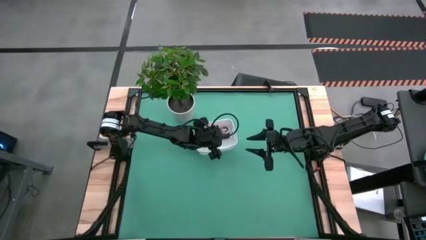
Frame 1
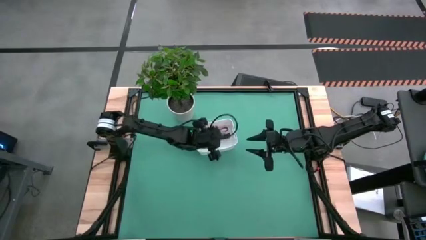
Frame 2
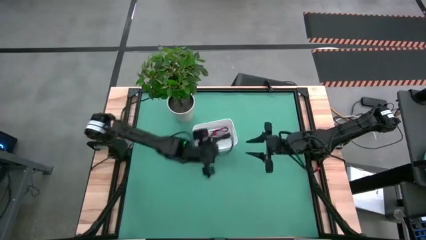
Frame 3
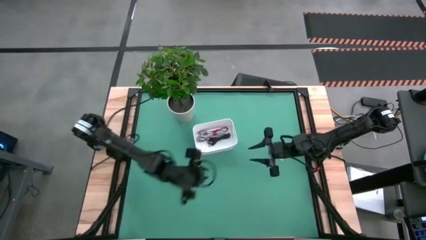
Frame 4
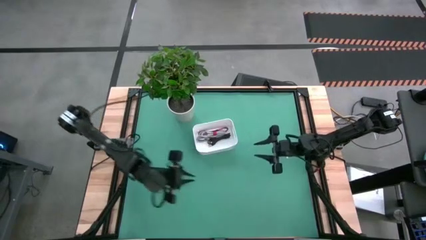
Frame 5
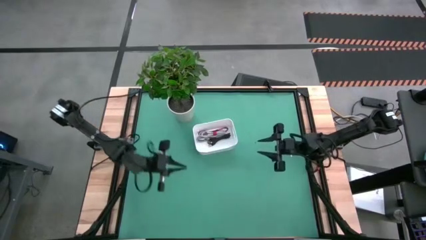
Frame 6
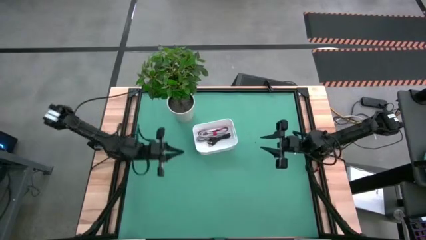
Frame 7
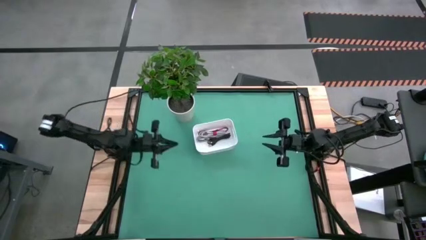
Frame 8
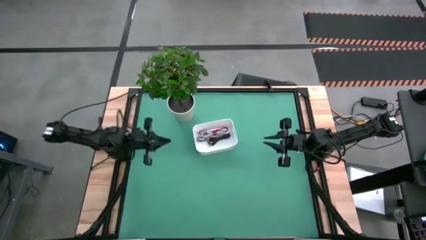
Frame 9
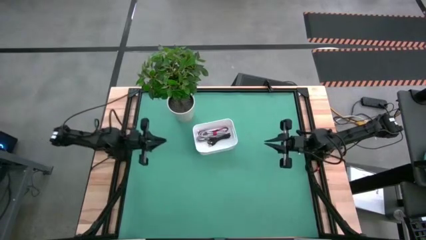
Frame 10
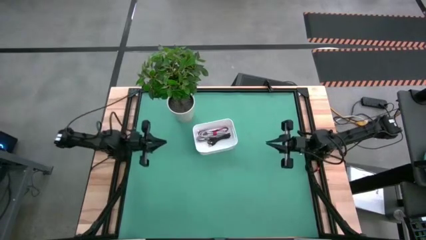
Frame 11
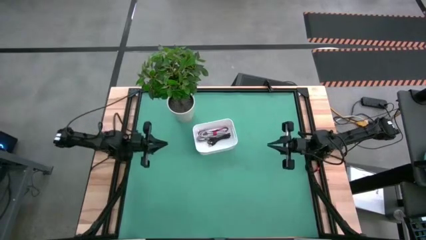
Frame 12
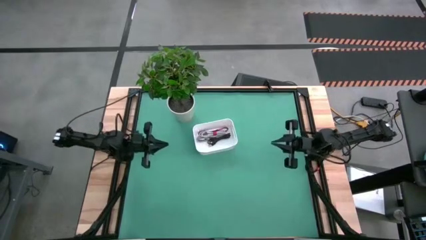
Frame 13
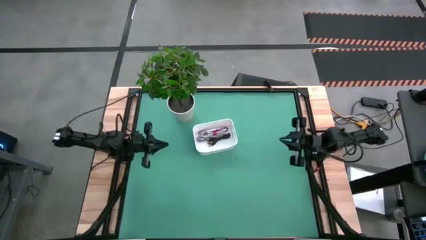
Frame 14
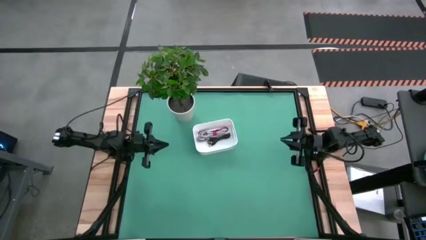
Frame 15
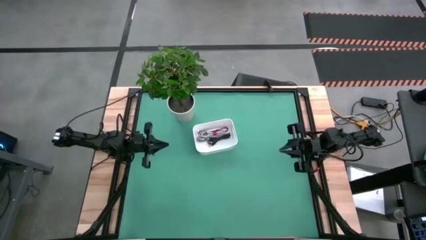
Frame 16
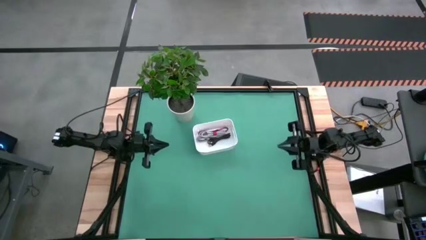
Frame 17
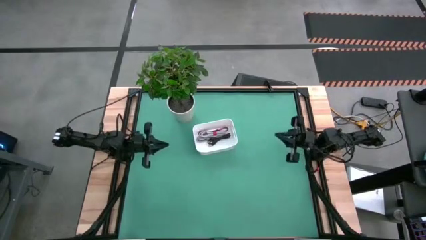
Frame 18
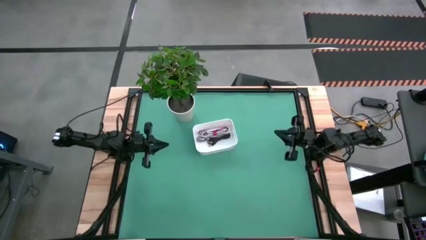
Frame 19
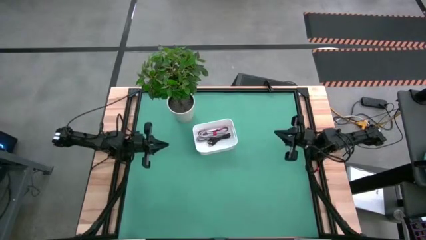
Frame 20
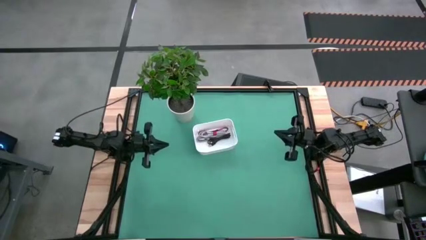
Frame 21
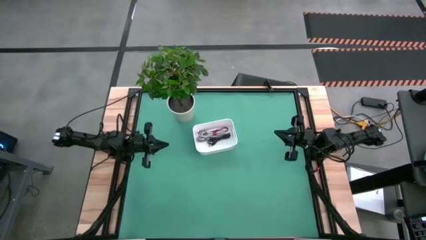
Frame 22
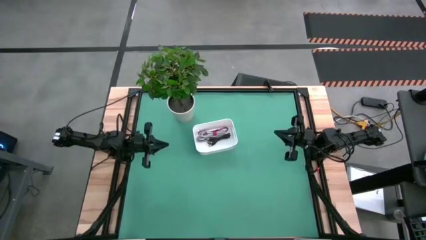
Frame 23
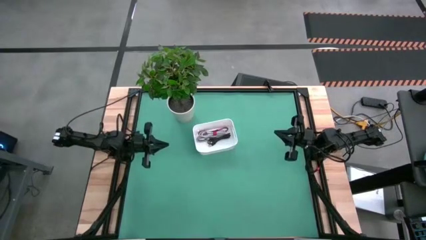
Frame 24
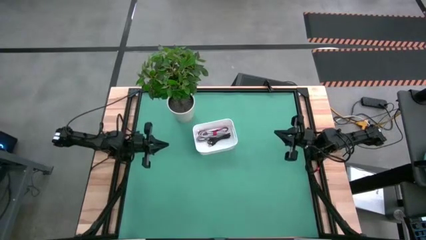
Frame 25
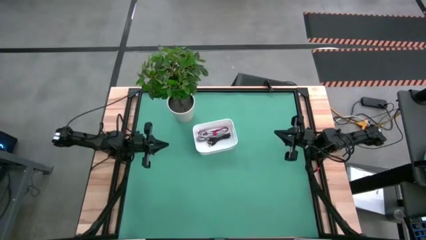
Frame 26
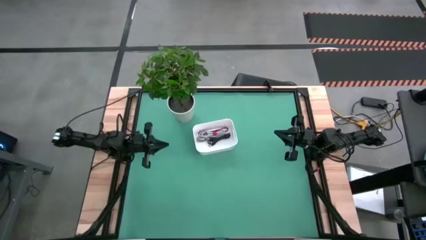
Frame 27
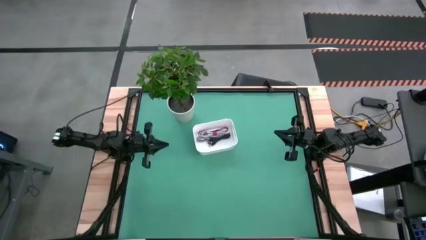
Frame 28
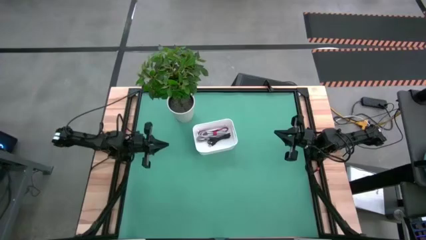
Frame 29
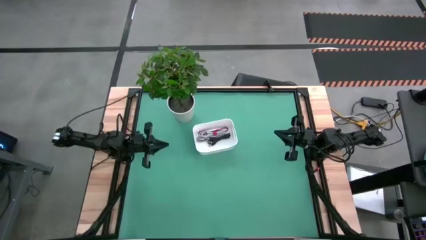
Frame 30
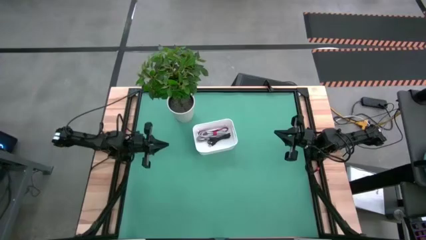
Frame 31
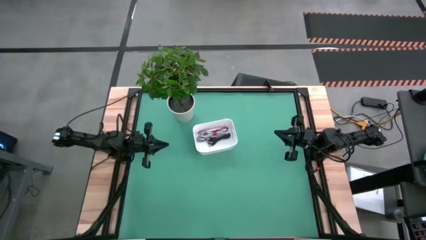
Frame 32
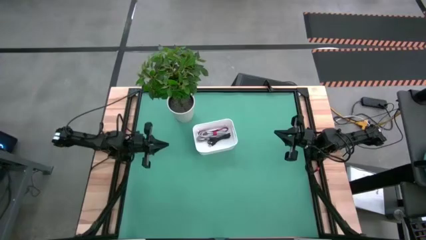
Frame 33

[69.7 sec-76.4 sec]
Task: Pick and place USB-C Cables
Return to Home Position
